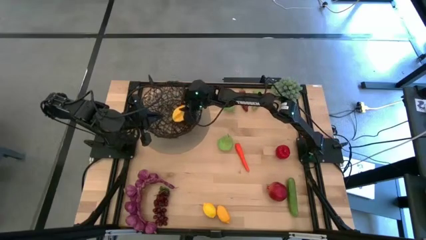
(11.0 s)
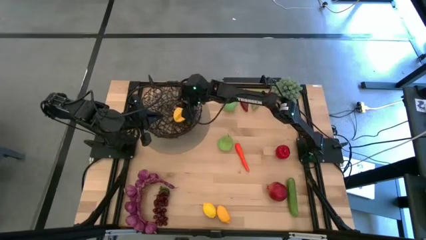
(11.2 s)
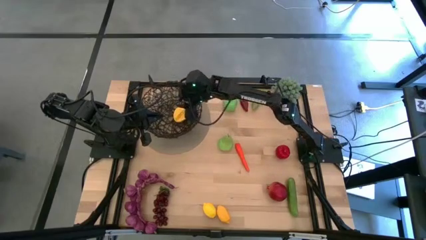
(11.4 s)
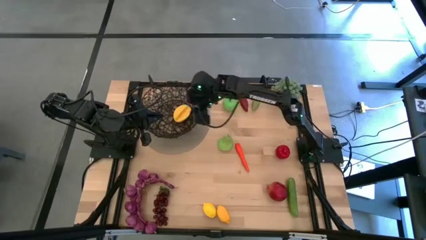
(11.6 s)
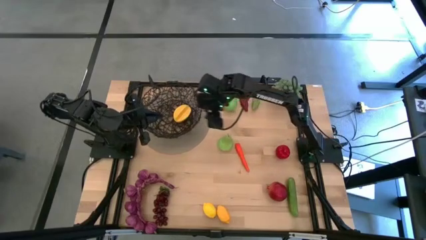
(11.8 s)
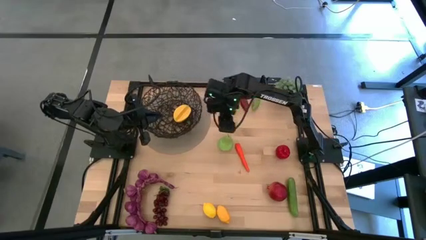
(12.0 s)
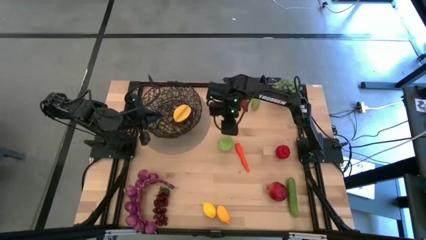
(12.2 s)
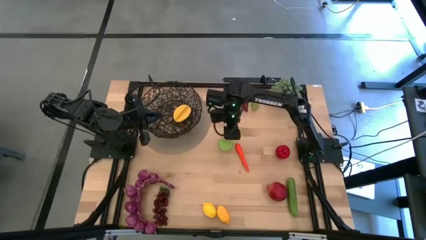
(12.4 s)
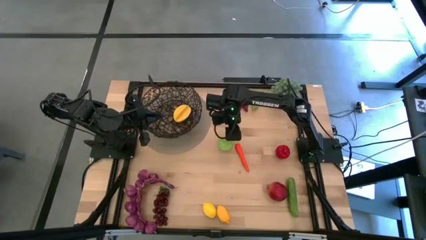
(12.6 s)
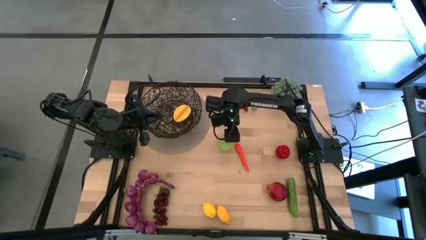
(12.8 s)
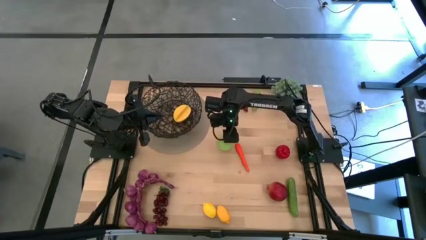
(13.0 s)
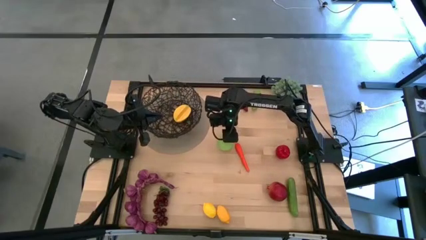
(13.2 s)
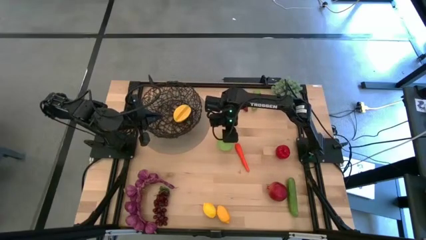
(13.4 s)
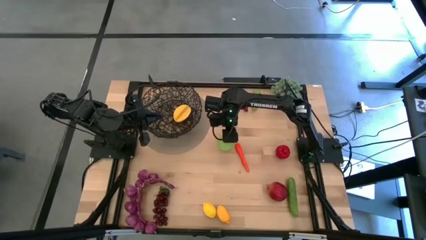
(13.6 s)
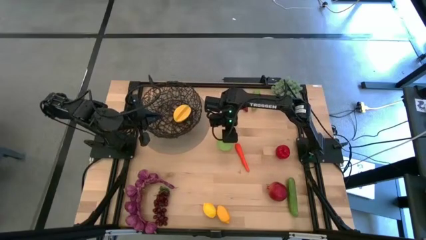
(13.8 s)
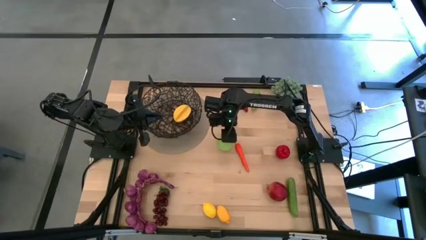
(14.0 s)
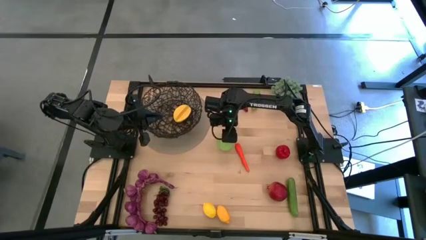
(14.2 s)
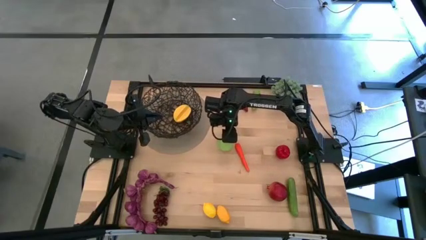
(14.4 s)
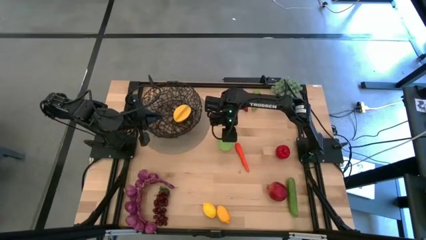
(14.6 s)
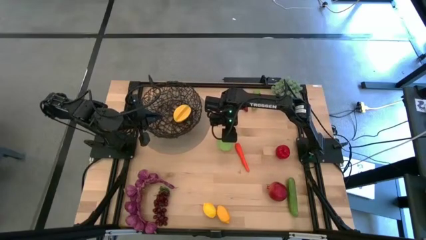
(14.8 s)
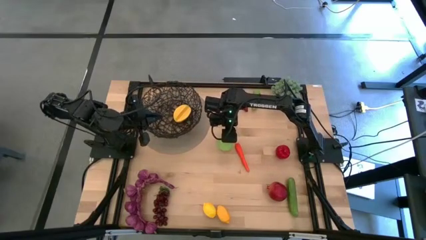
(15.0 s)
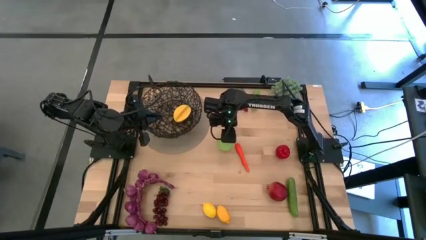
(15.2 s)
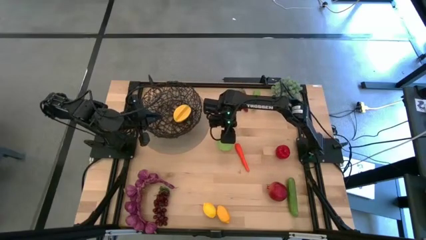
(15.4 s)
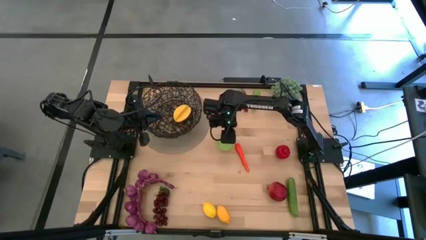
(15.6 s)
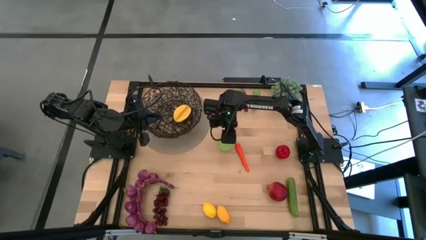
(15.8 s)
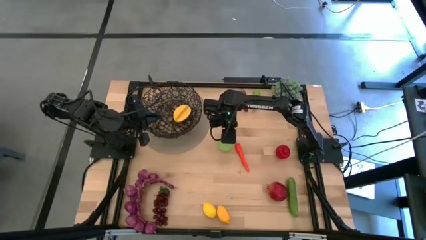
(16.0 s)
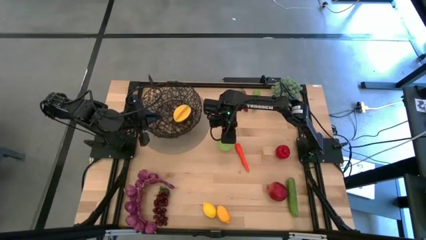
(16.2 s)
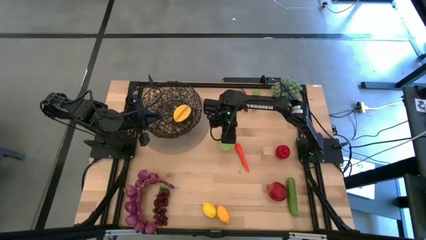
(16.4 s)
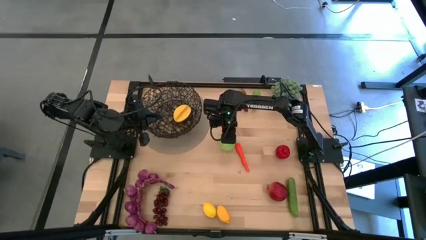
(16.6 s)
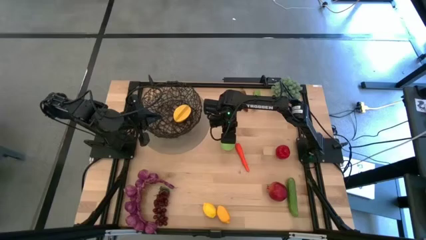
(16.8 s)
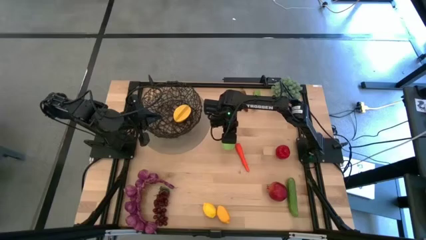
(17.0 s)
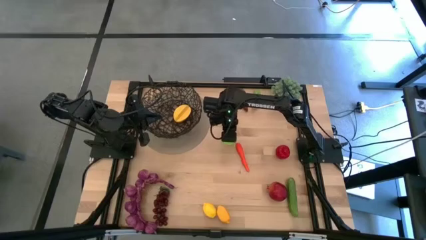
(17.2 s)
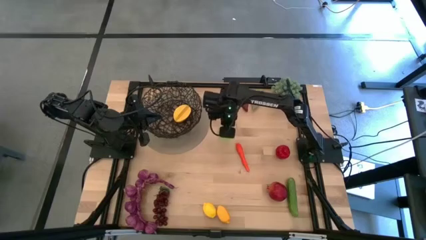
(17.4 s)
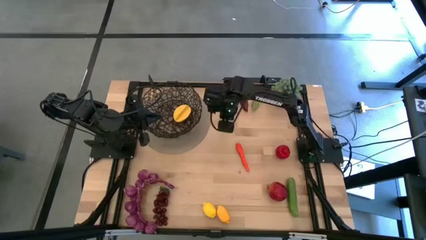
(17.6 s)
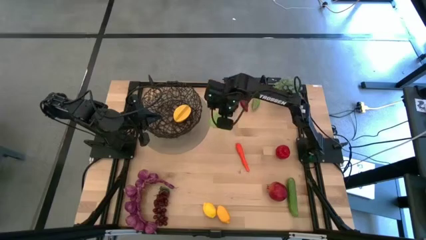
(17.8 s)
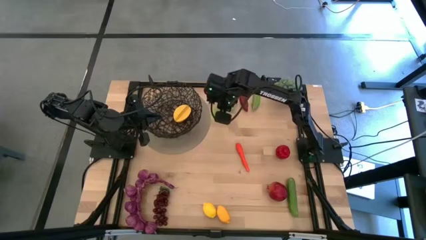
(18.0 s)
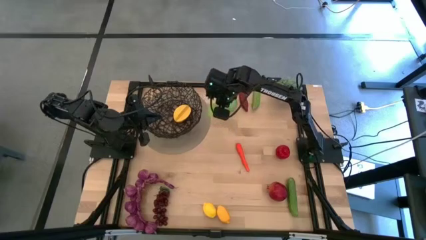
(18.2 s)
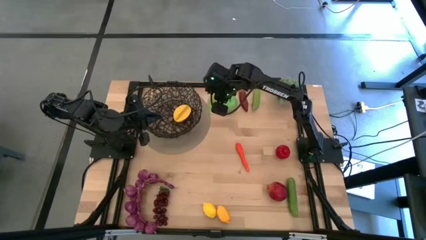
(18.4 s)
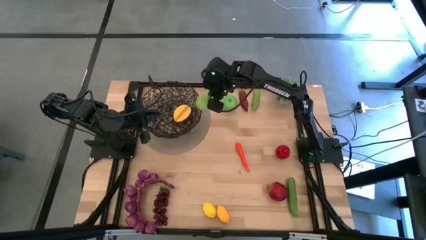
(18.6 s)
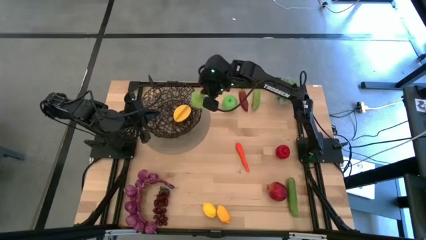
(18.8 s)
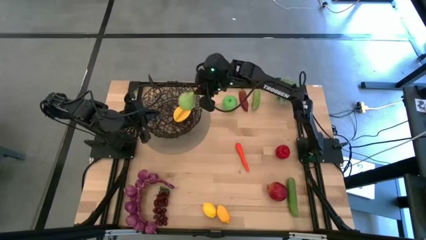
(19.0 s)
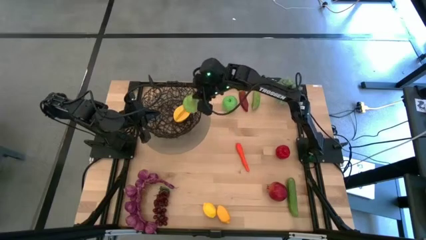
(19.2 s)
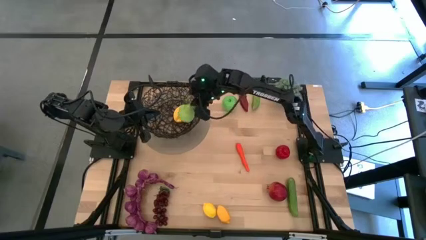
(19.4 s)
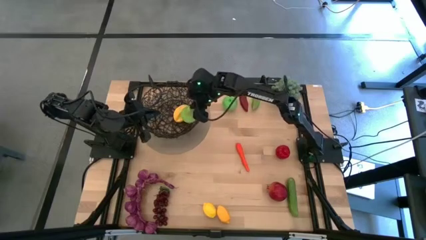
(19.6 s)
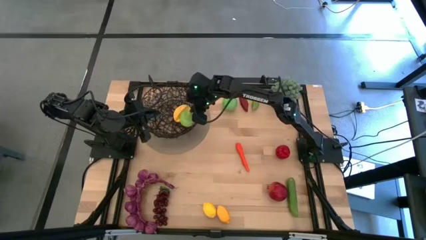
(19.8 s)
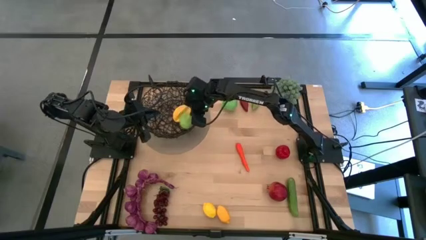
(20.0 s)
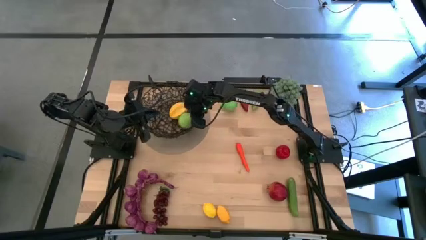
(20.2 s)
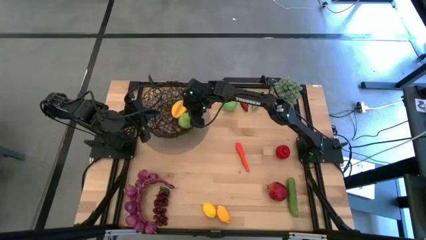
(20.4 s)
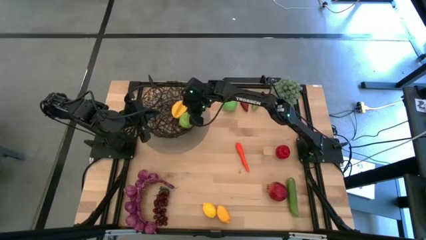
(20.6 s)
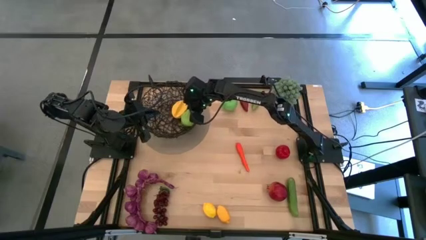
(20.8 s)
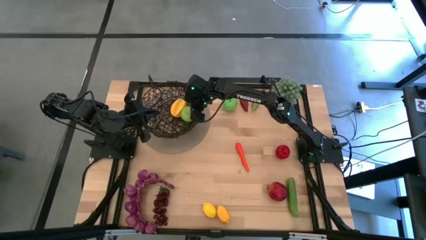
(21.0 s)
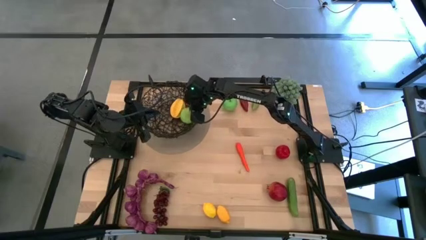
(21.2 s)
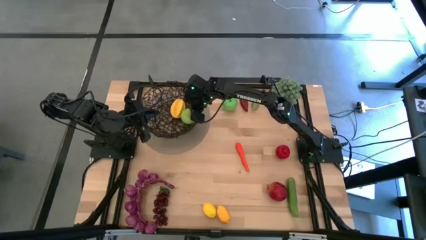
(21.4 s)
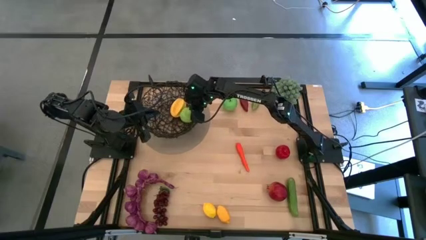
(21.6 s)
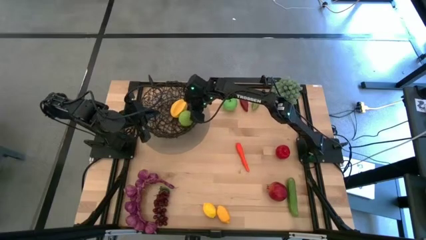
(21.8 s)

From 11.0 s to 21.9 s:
Task: Build produce basket
Put the green pear into the black wire basket

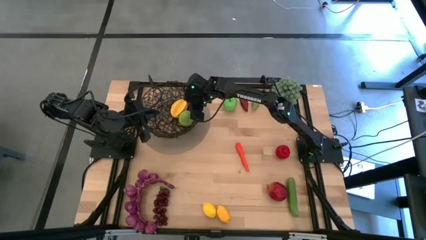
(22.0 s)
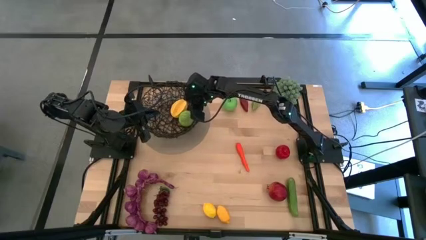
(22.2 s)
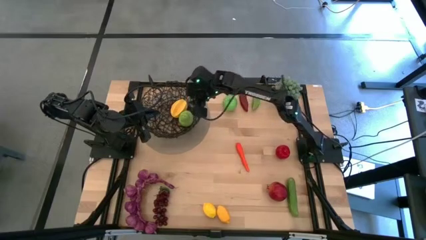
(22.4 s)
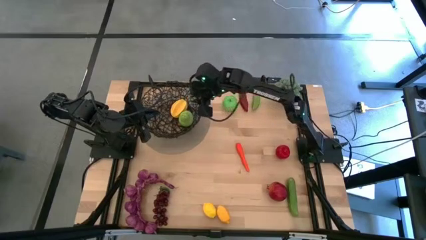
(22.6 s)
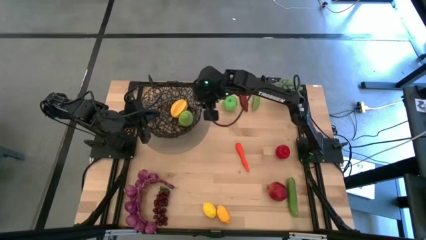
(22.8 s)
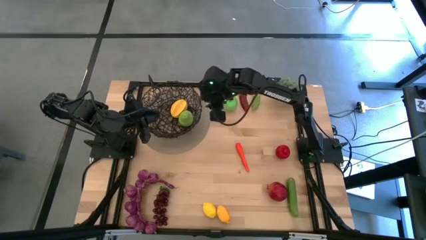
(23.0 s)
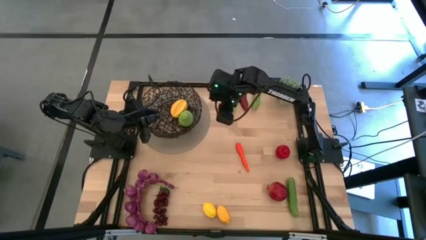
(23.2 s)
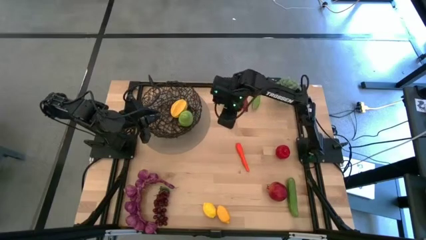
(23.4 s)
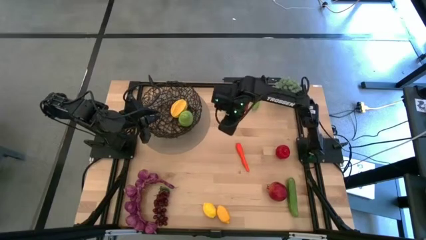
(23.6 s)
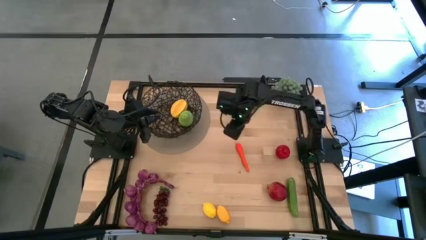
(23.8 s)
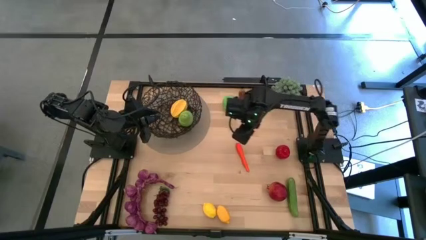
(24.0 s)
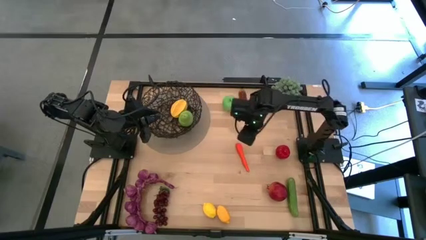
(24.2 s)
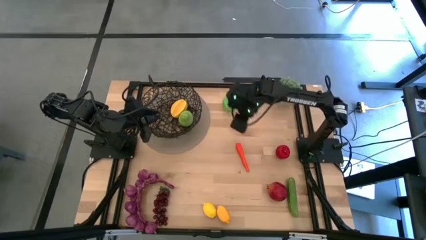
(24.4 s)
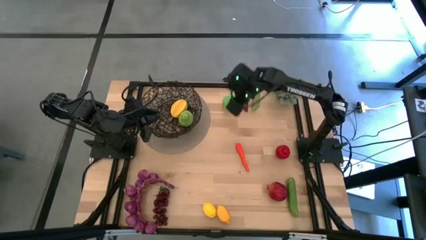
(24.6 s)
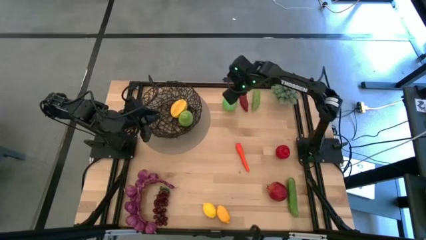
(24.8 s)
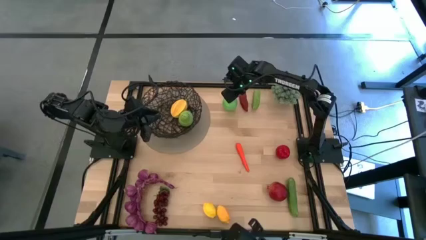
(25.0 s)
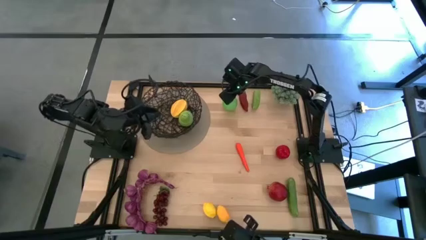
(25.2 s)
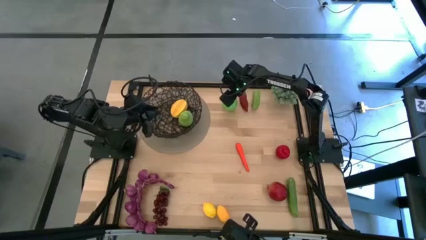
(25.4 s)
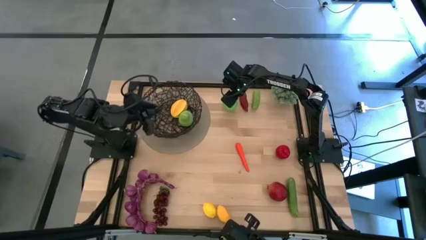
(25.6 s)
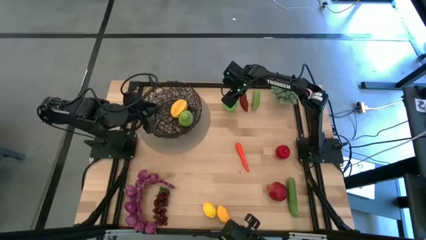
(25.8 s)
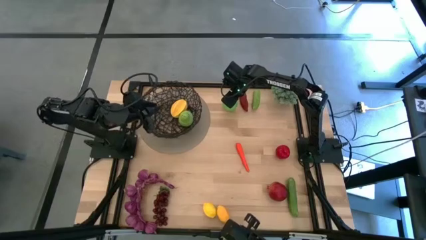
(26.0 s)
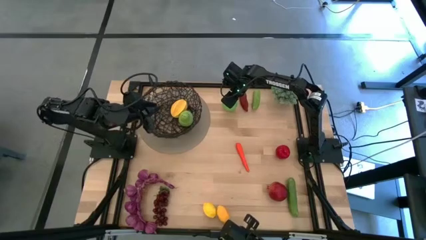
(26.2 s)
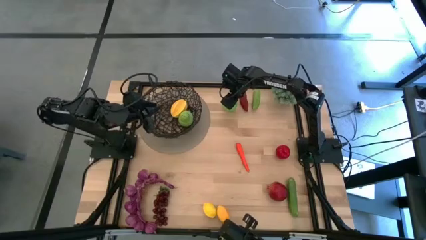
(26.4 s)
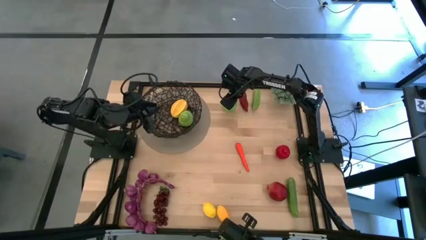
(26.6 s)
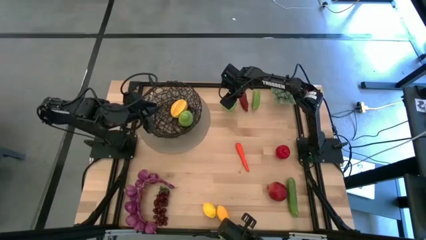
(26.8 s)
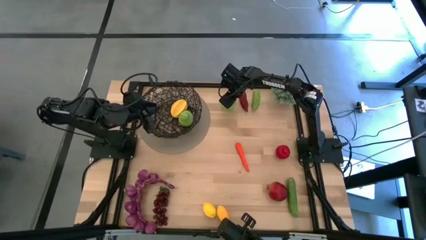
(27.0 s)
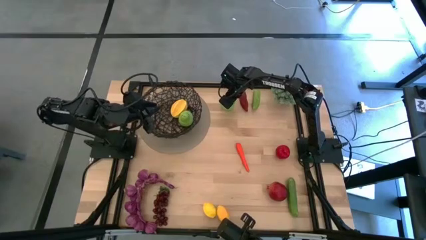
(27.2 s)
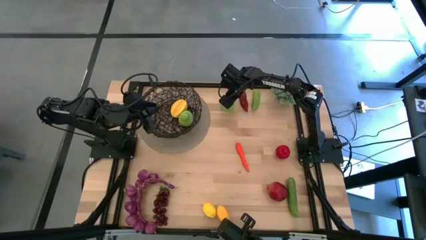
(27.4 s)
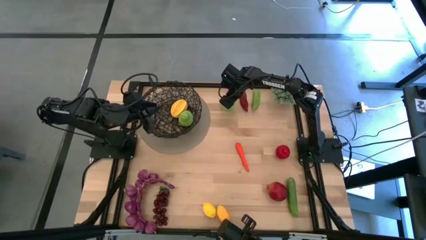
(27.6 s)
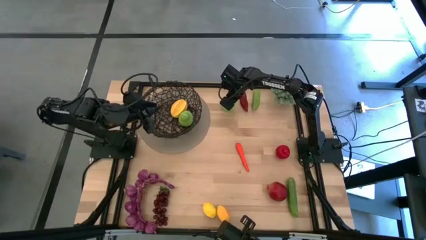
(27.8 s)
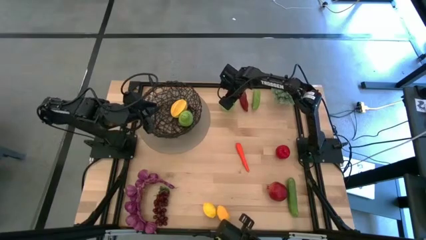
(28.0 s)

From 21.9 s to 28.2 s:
Put the green apple into the black wire basket
